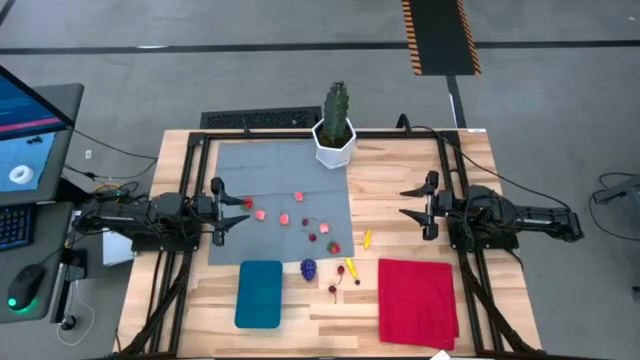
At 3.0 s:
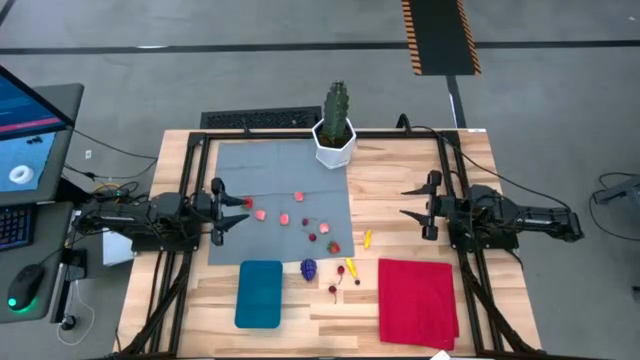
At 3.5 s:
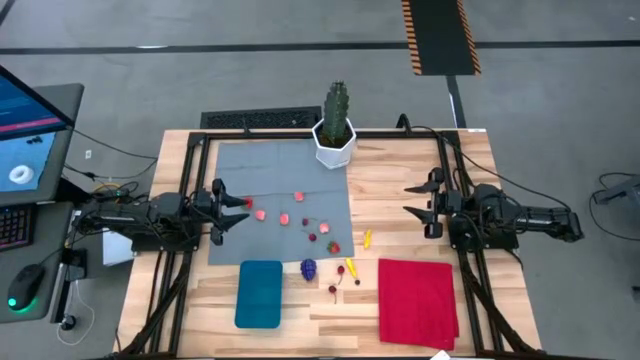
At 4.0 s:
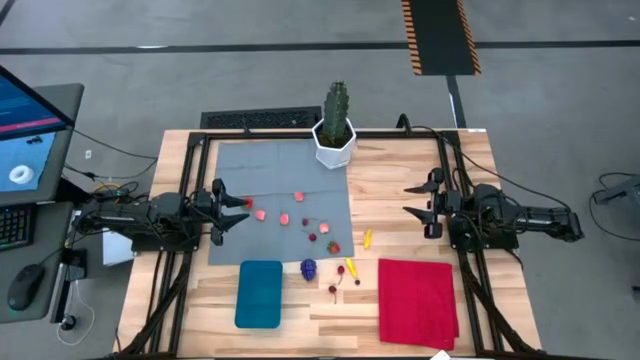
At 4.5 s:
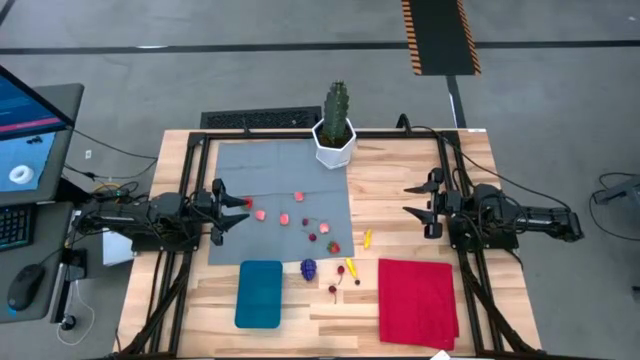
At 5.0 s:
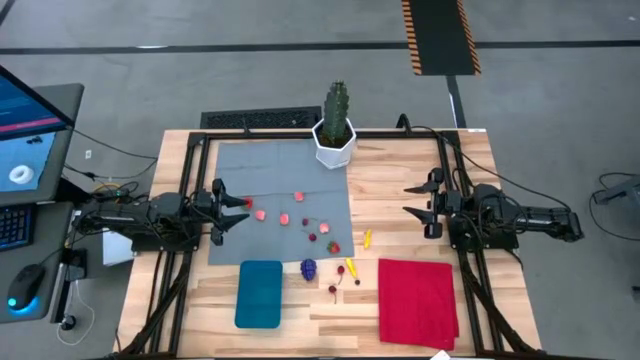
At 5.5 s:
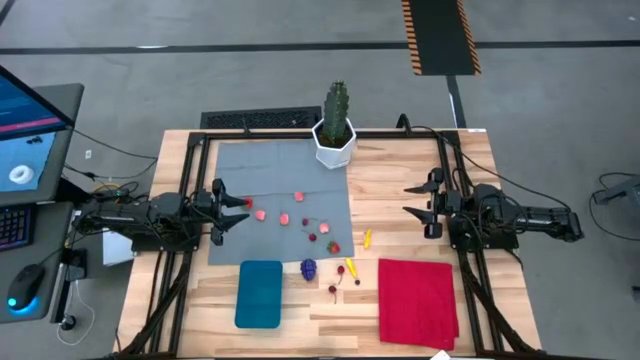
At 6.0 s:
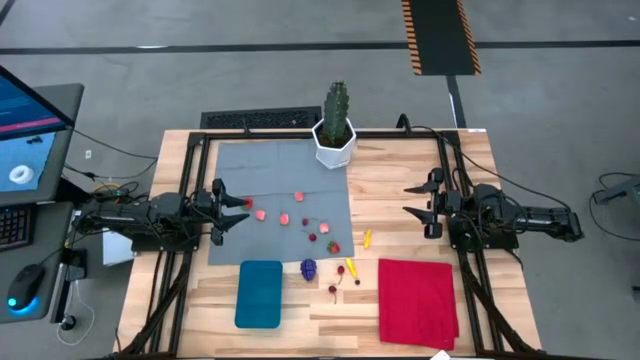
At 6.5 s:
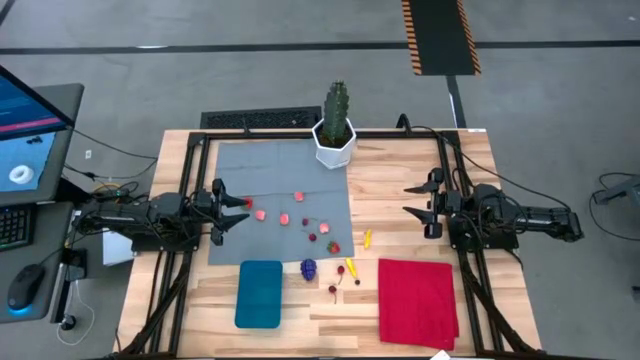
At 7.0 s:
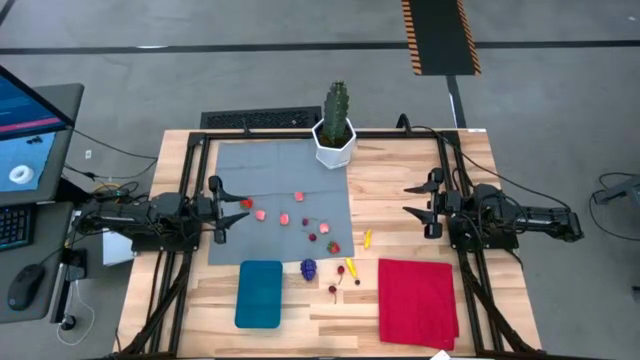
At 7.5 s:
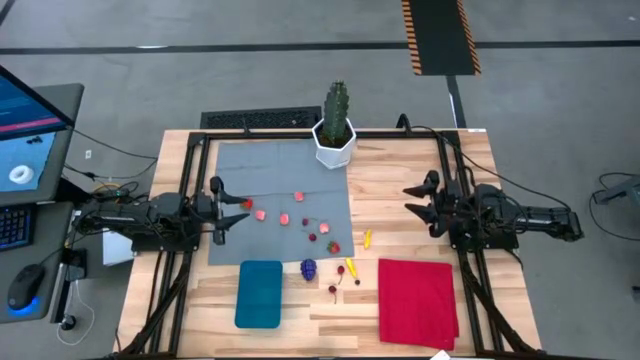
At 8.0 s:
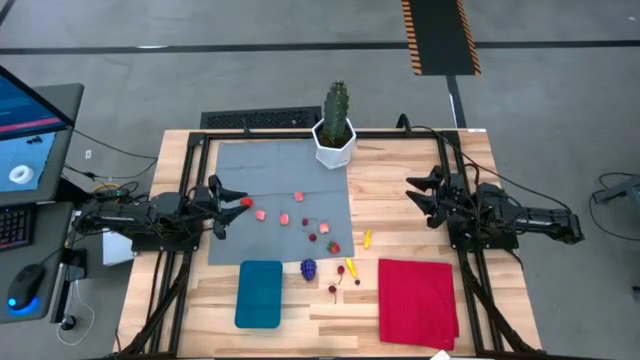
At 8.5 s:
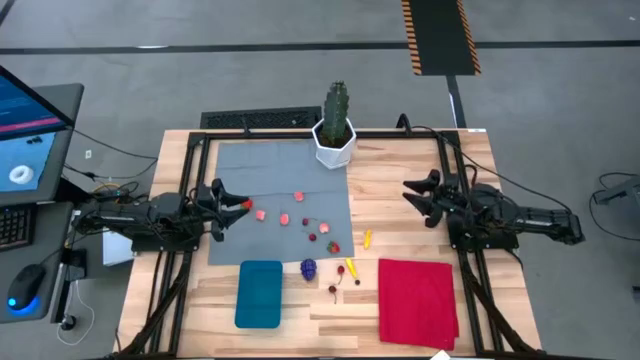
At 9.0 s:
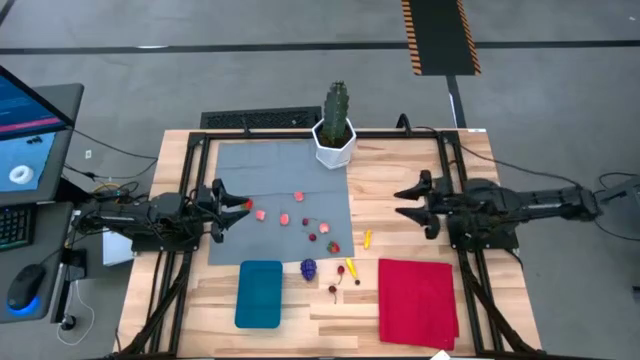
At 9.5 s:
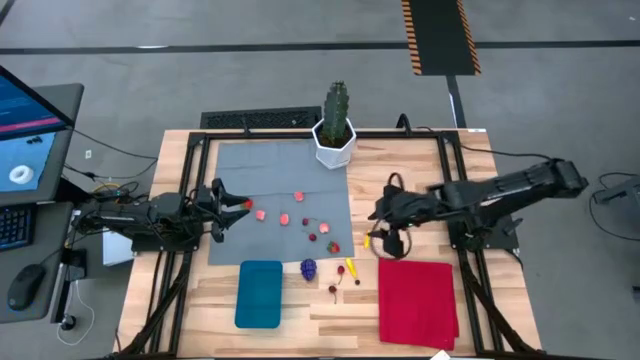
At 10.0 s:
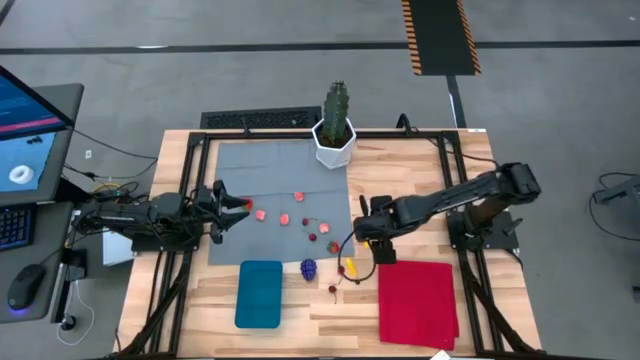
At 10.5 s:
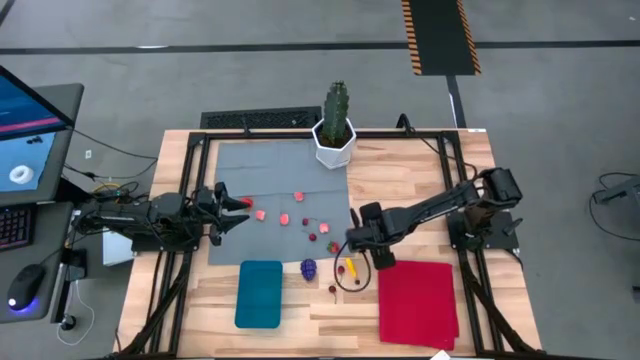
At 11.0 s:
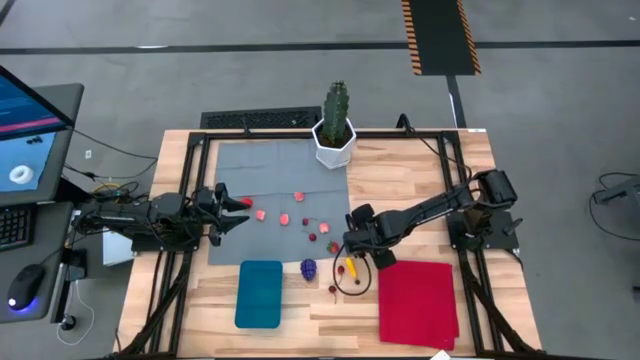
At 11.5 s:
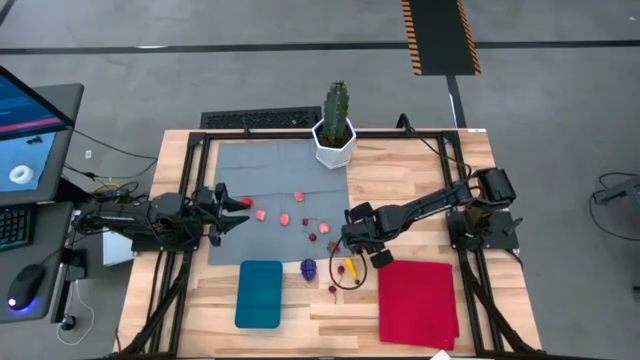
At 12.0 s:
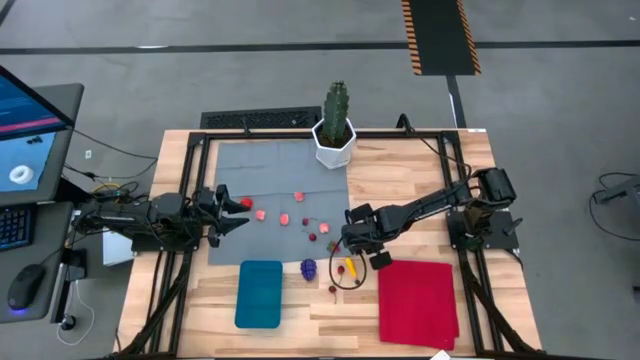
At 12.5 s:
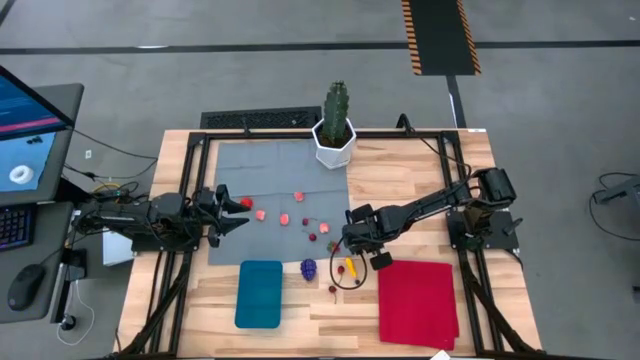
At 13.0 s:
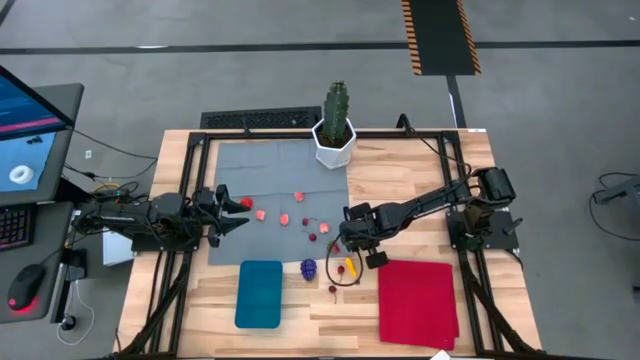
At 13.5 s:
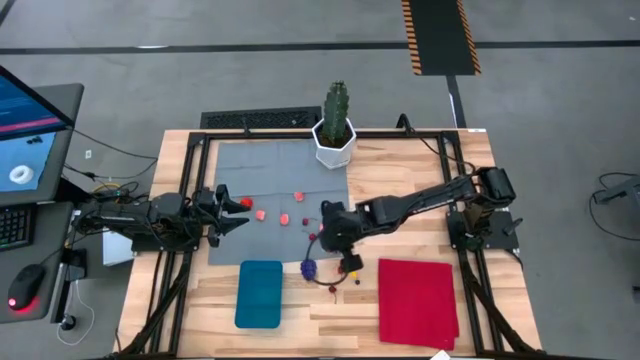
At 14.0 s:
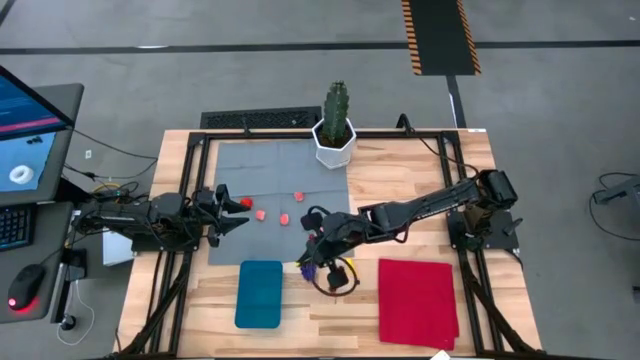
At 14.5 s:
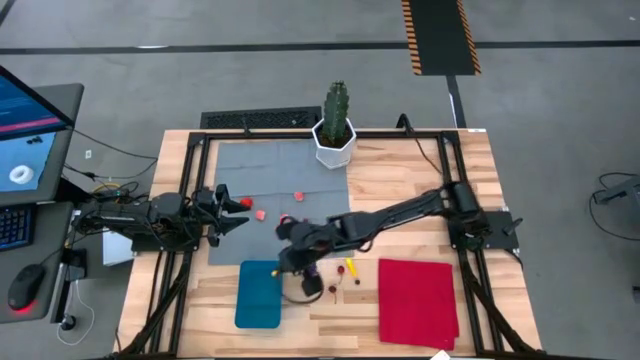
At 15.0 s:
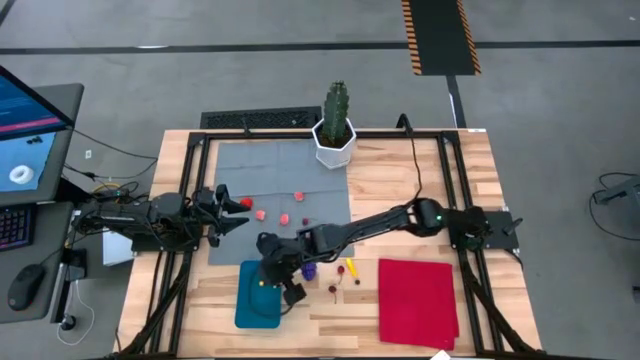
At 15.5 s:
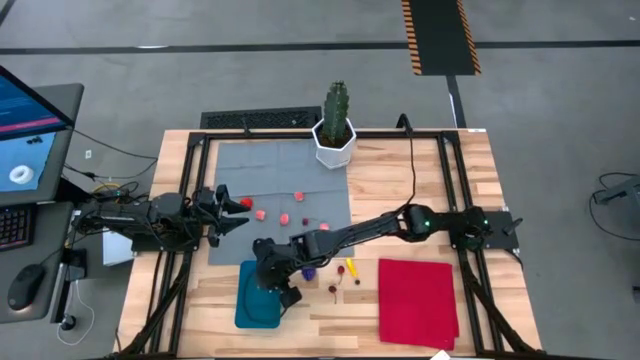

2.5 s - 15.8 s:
Task: Pick and placing Produce into tupperware
Put the corn into the blue bin

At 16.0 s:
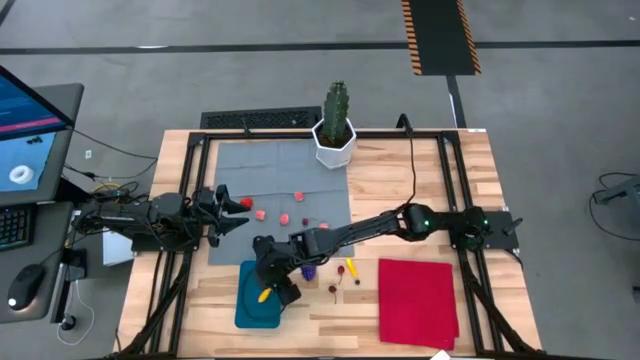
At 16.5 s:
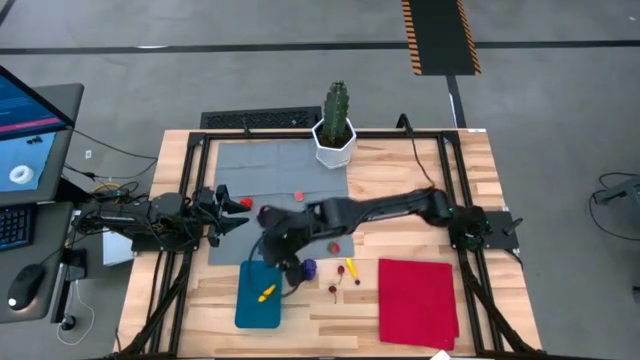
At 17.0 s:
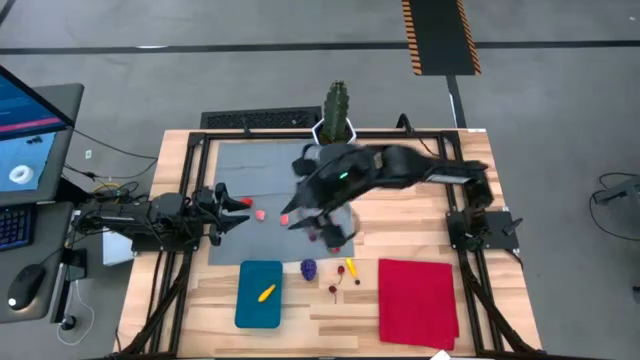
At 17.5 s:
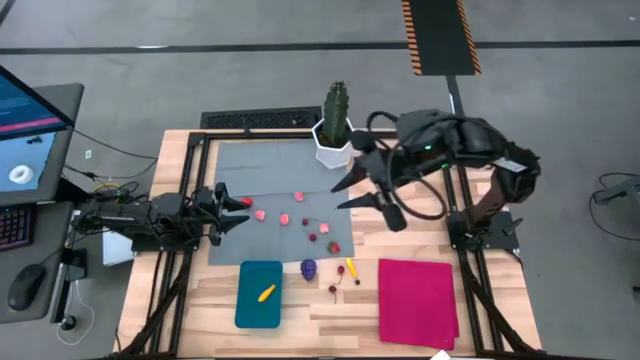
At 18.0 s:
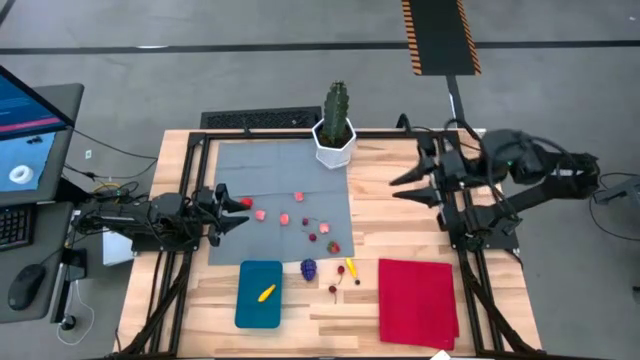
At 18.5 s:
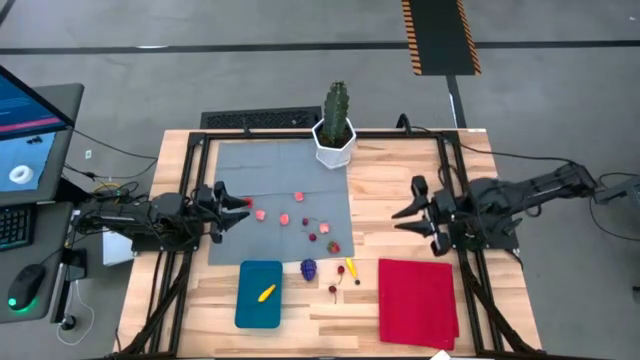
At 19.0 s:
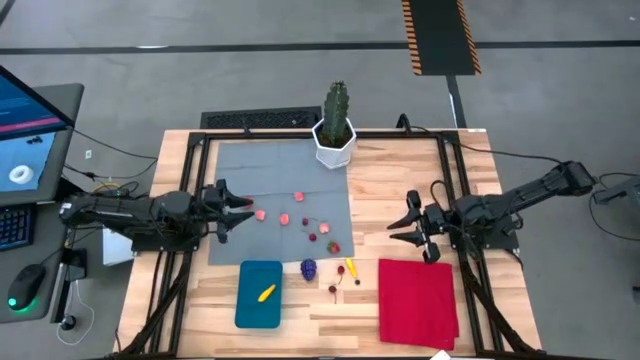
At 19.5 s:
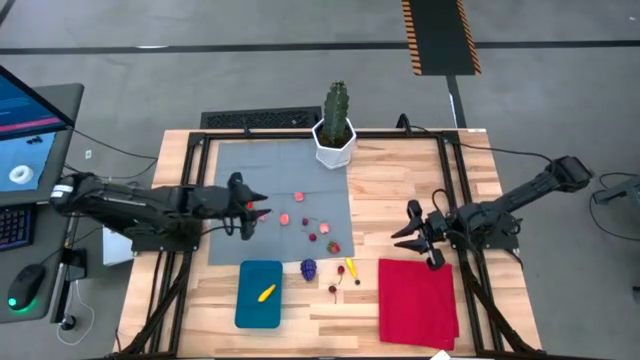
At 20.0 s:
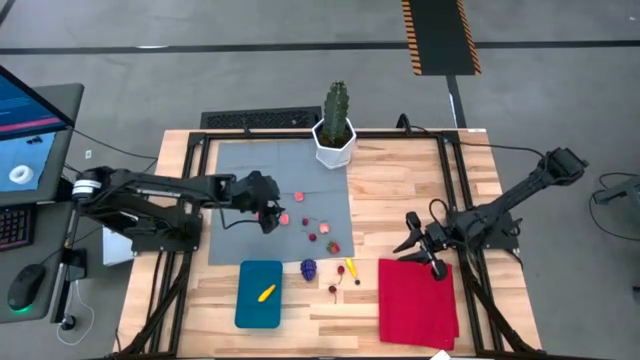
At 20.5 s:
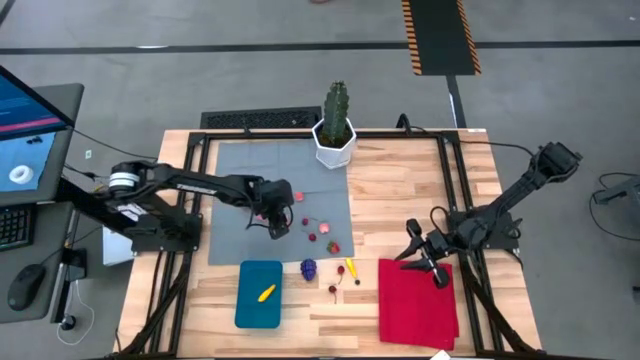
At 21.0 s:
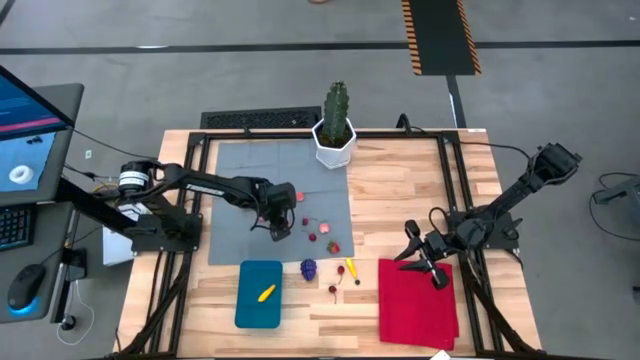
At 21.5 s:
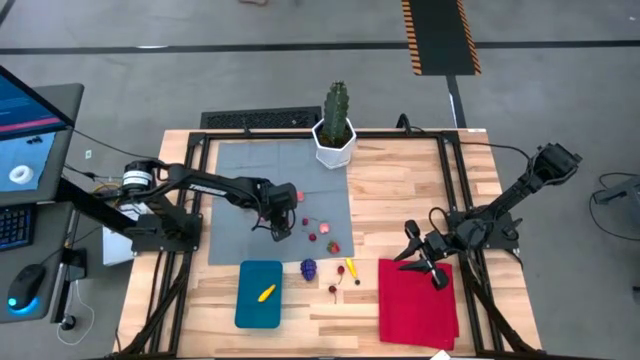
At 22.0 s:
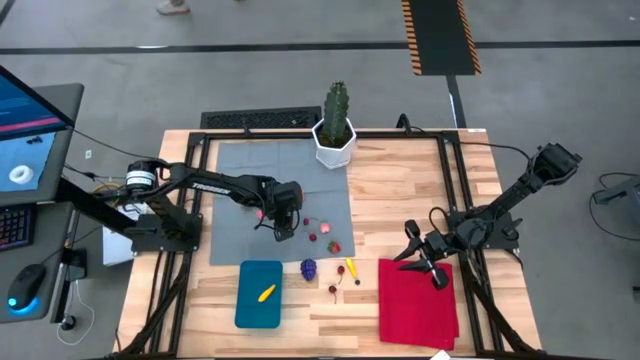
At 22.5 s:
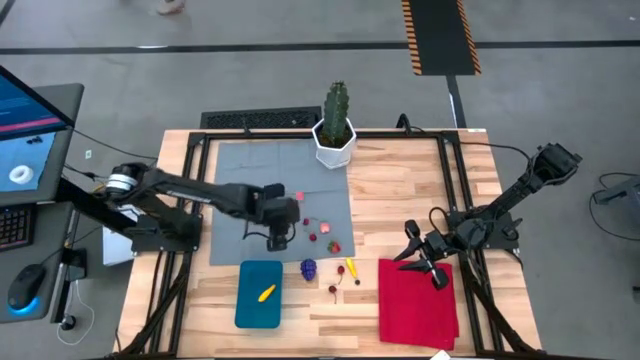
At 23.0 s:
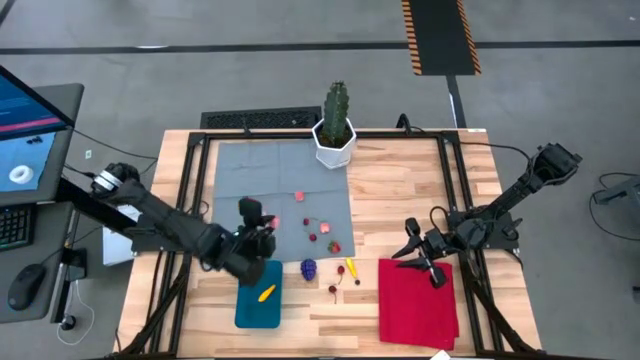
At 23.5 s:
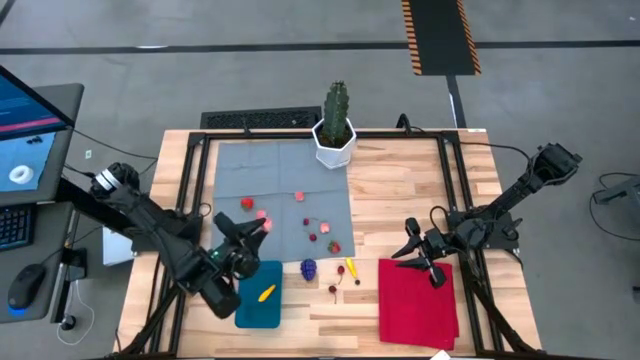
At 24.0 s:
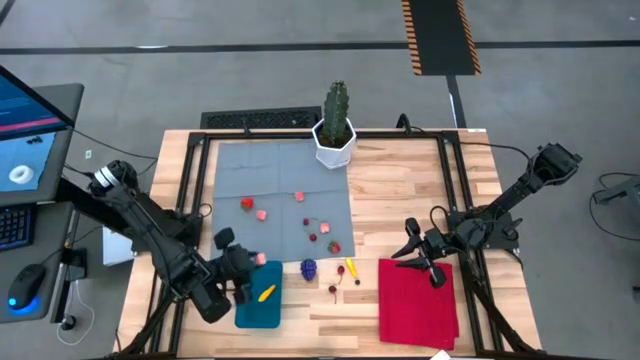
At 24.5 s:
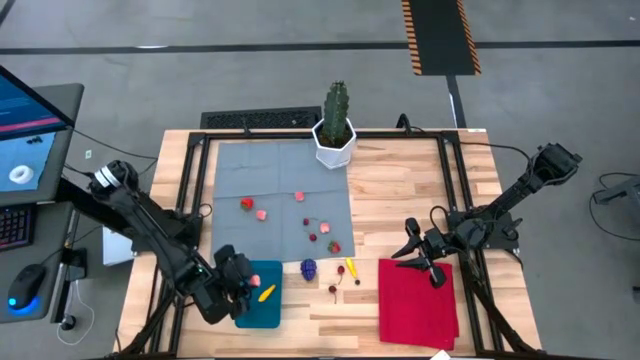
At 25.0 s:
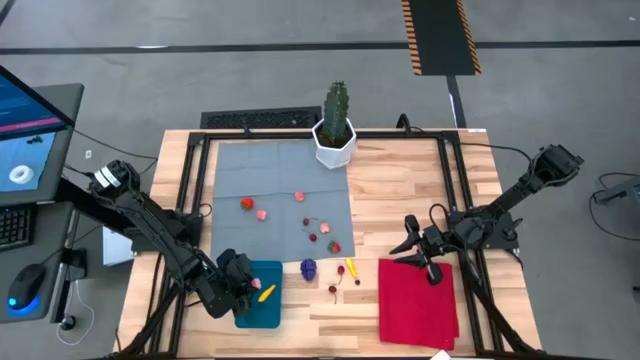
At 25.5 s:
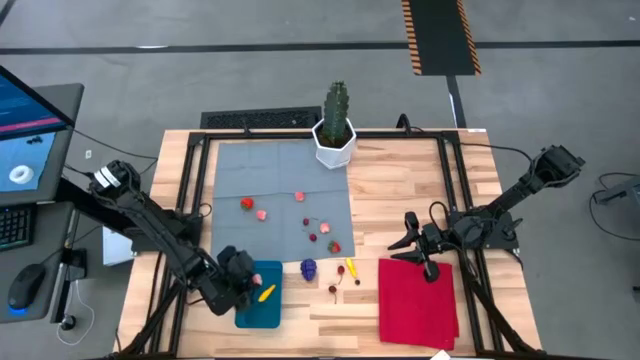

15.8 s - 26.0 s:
Put the peach into the blue bin
